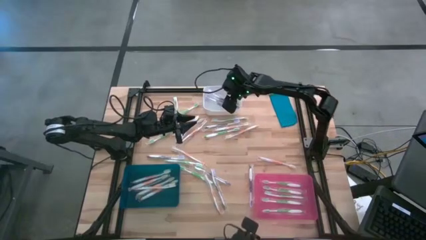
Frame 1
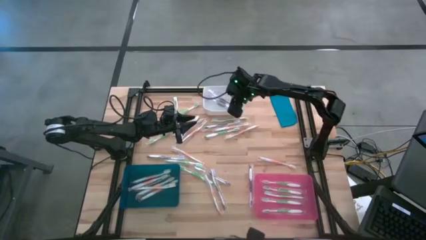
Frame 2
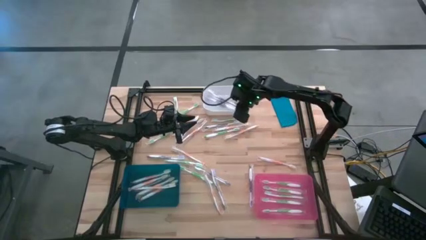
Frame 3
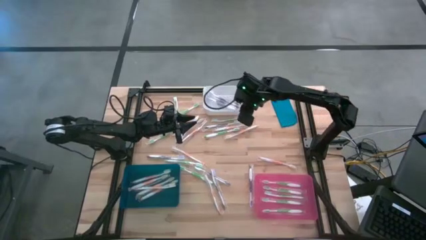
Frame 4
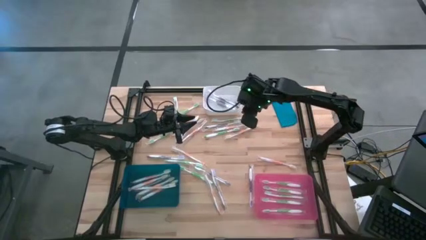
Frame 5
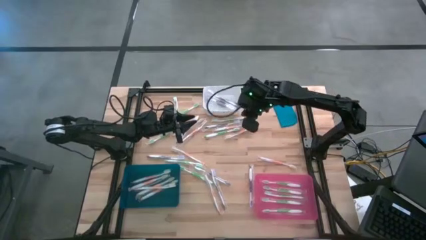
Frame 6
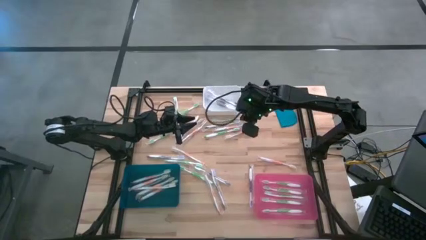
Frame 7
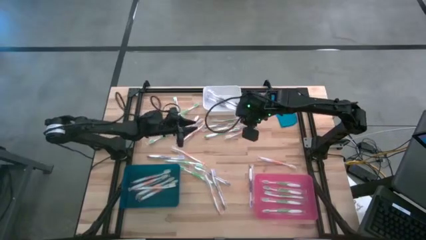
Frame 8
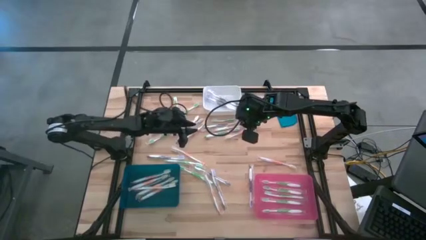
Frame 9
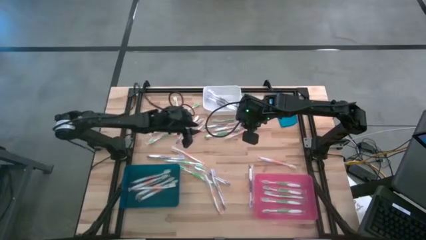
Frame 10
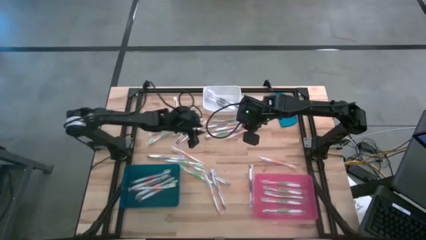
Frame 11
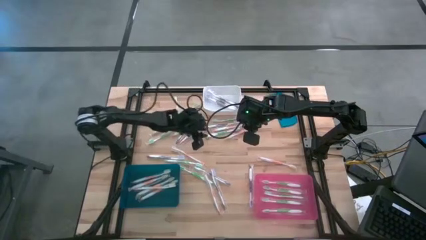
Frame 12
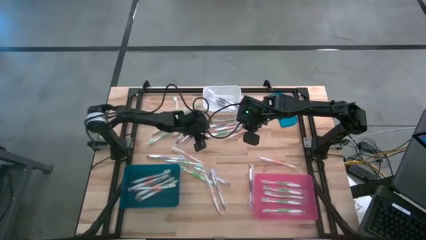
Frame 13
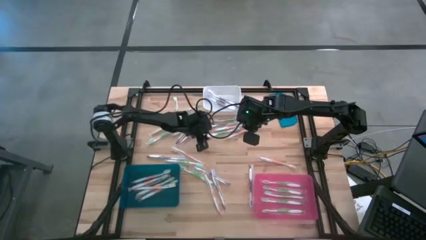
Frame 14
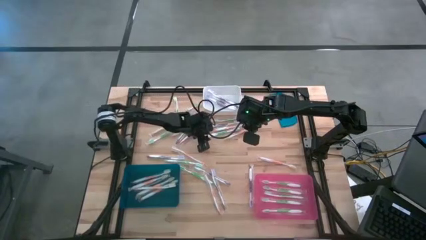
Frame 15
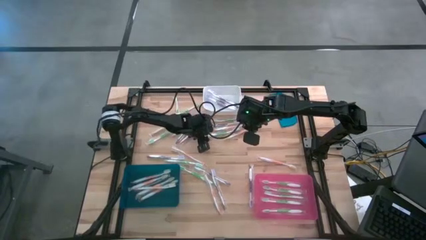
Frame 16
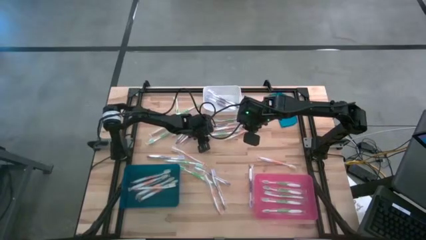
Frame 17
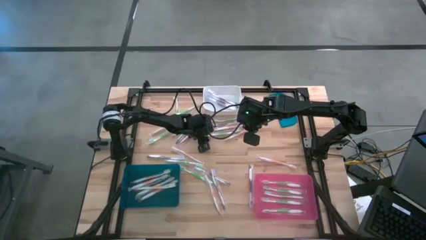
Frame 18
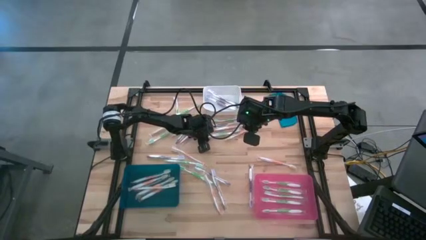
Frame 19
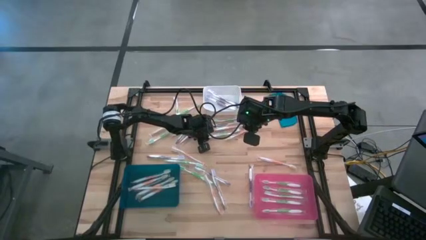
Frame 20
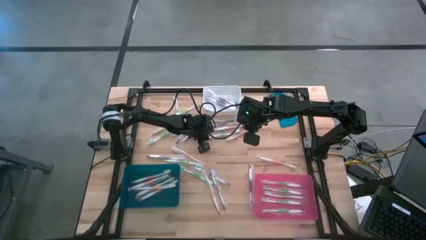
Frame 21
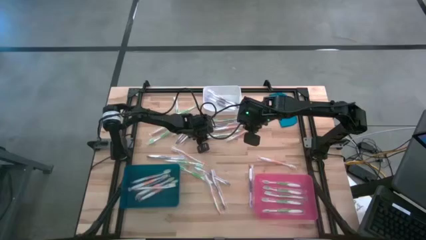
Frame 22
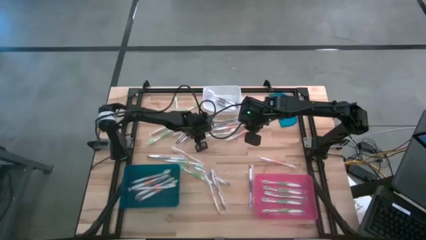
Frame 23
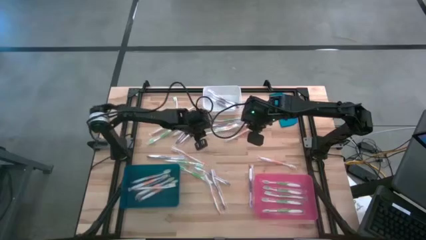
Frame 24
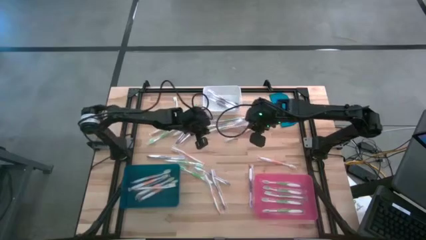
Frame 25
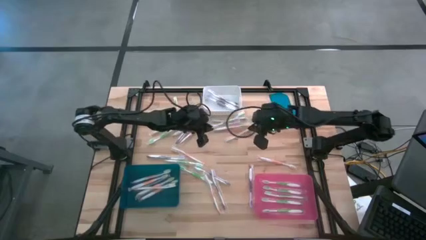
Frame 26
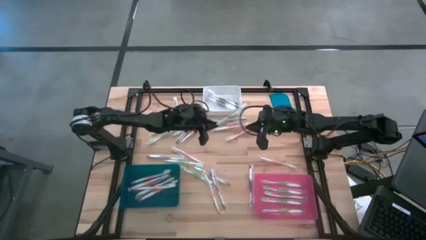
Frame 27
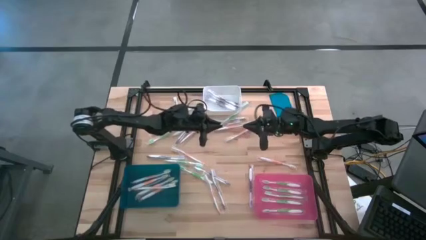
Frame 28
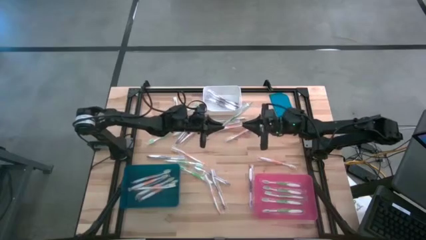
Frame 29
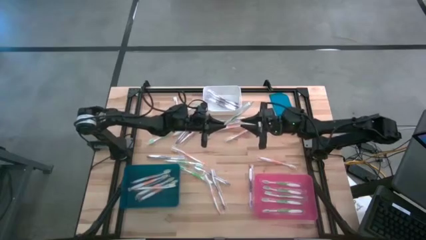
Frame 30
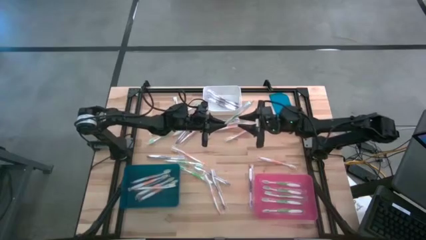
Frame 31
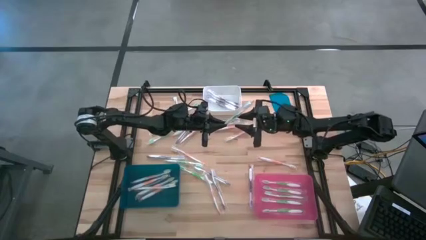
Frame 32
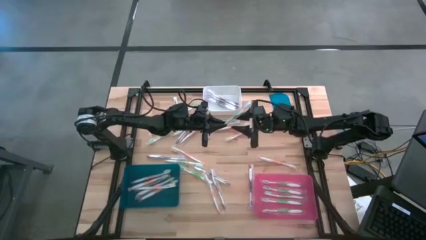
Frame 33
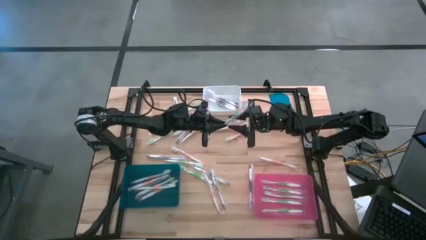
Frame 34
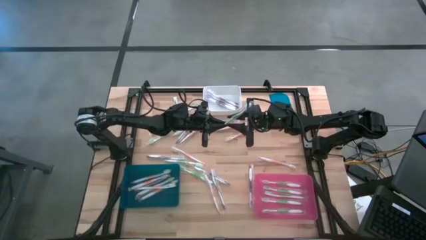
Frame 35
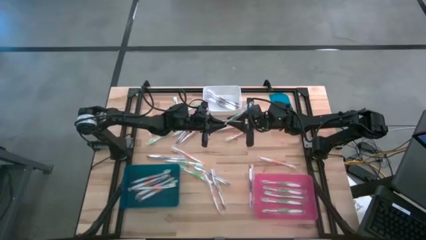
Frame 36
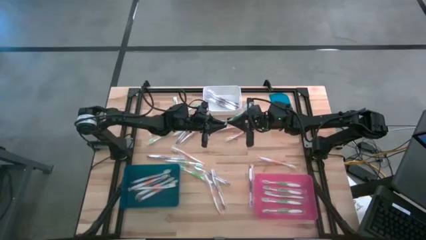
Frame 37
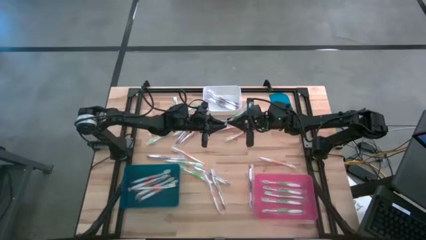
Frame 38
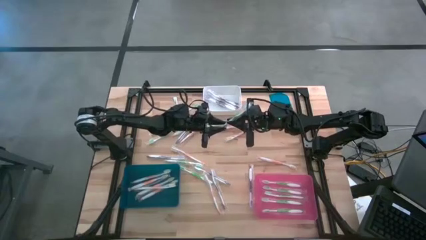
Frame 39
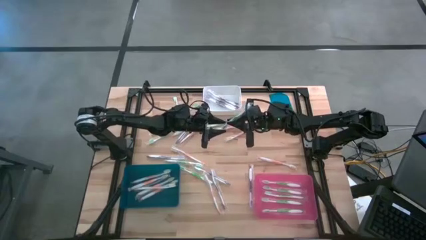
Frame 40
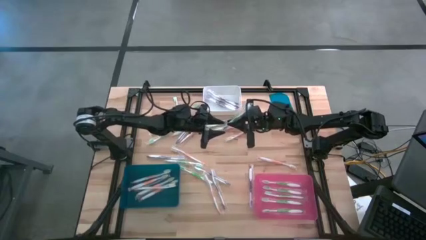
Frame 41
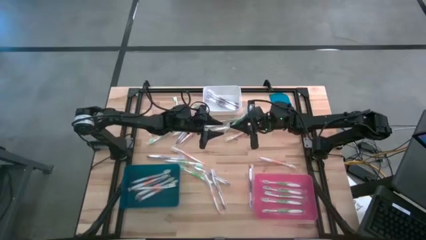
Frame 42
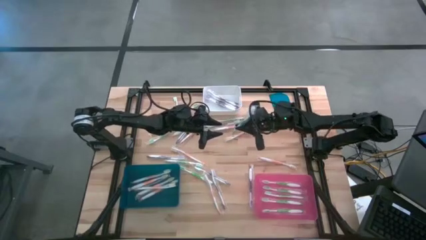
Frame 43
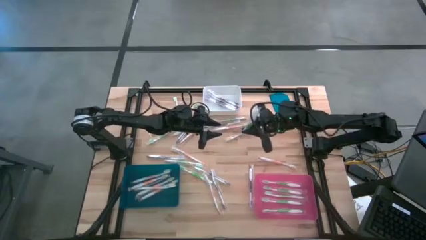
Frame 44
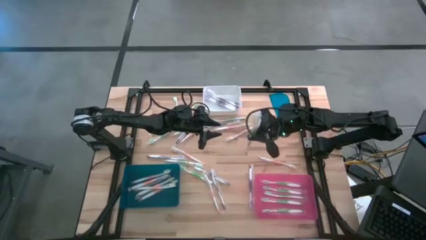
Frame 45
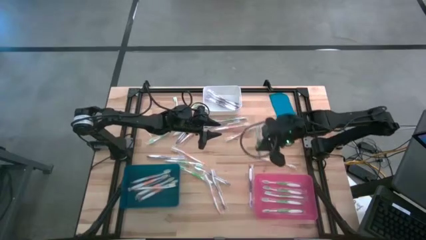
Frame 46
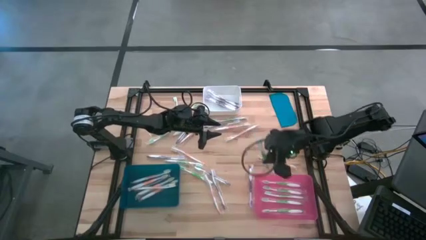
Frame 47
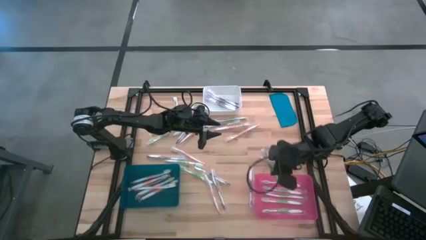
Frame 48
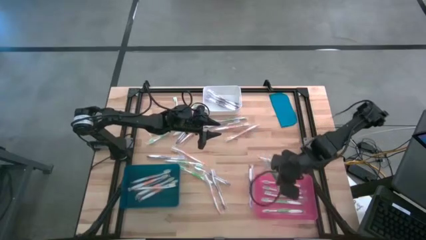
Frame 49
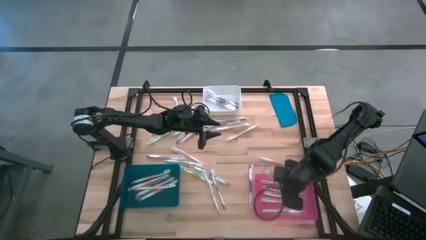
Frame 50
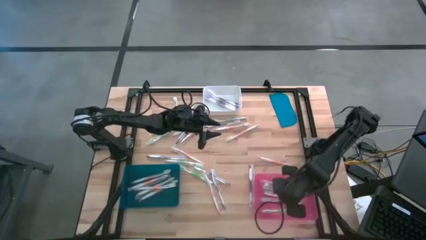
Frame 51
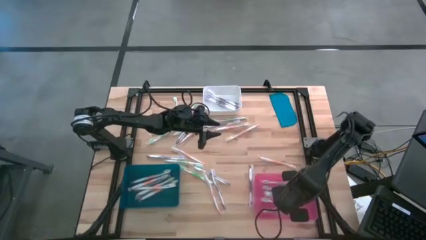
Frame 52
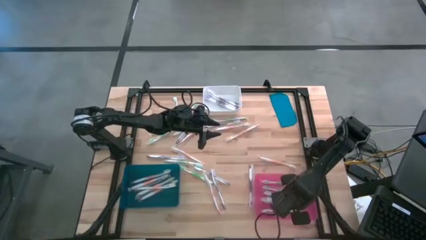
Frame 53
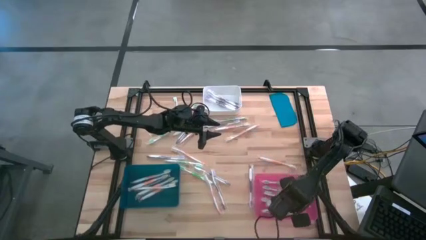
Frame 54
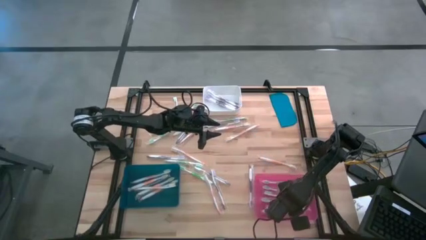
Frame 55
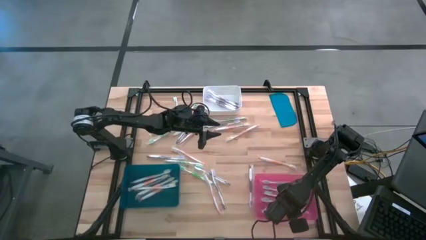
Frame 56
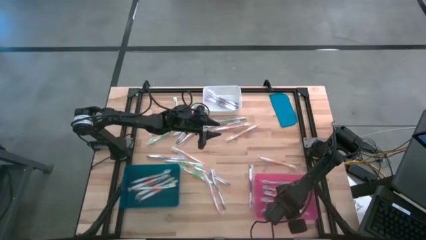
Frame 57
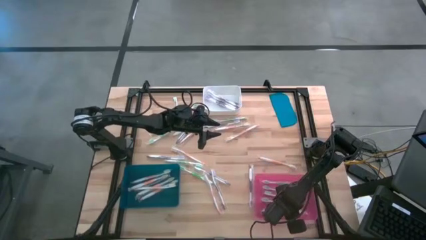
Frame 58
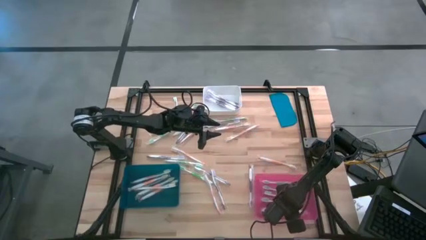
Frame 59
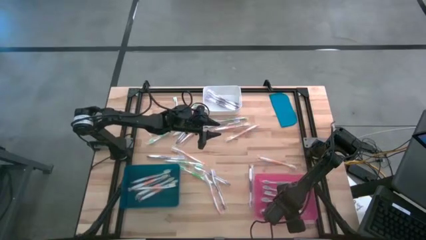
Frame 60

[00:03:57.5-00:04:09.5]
Task: Pick & Place Toothbrushes
Put the green toothbrush into the pink bin
